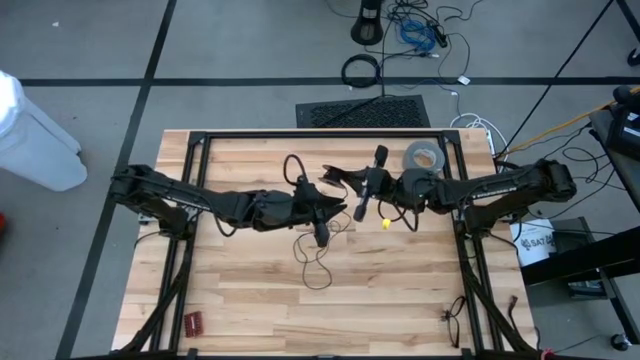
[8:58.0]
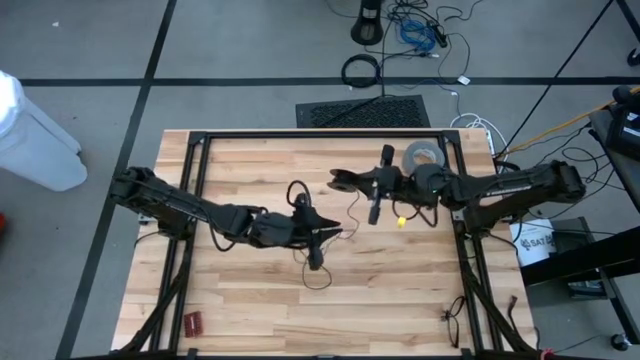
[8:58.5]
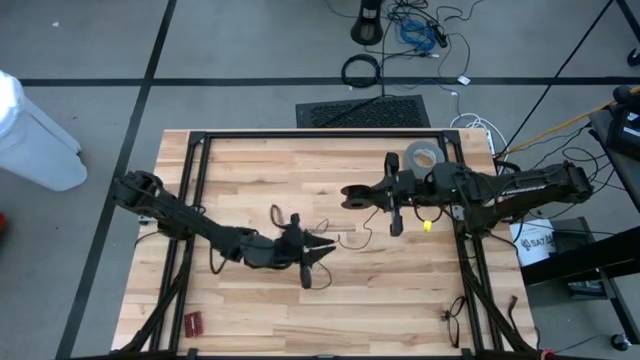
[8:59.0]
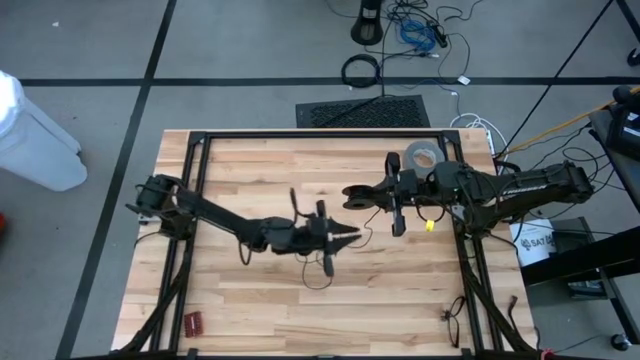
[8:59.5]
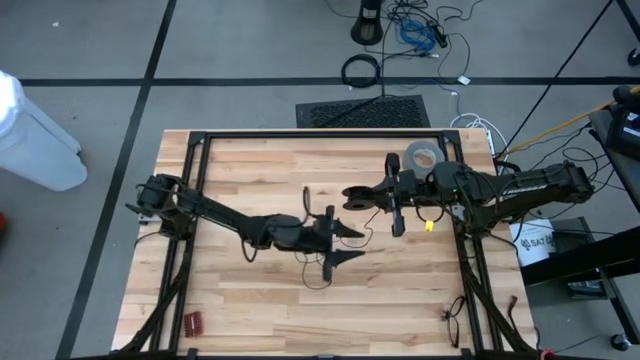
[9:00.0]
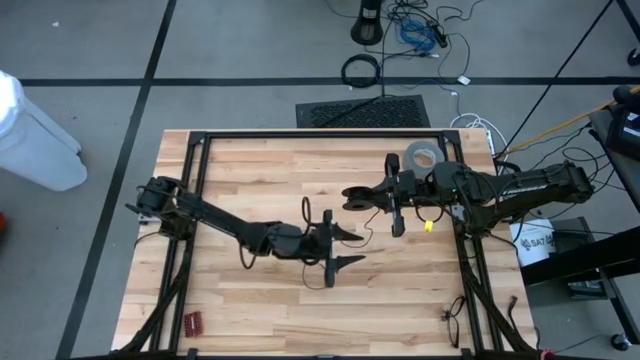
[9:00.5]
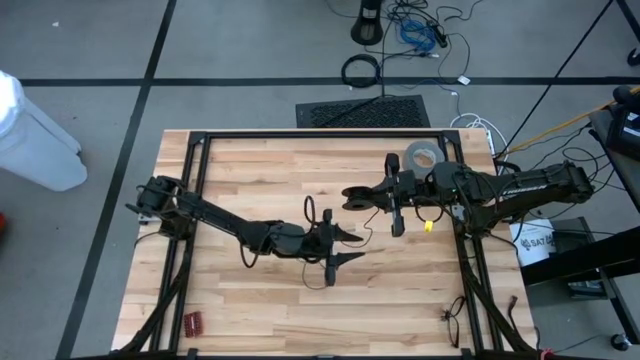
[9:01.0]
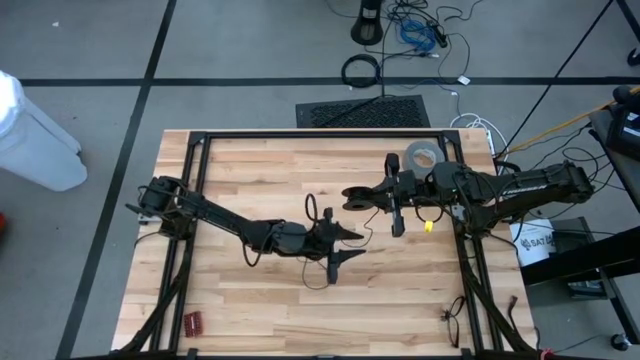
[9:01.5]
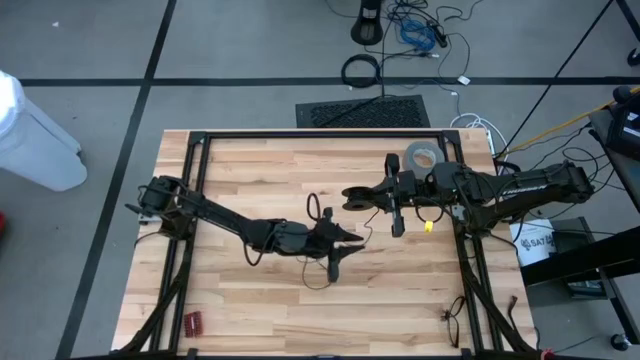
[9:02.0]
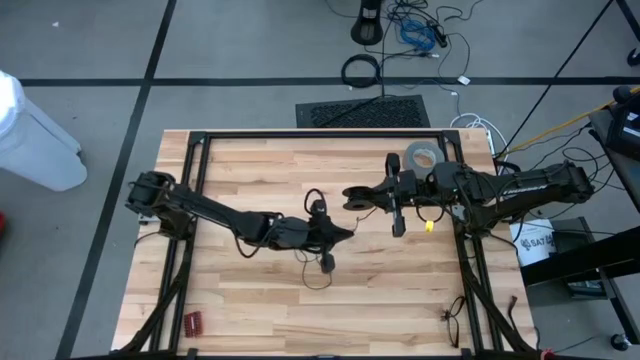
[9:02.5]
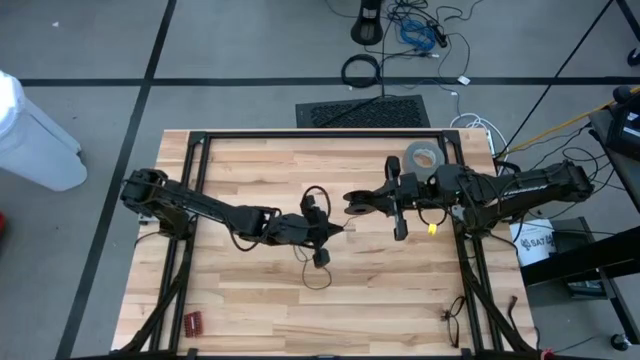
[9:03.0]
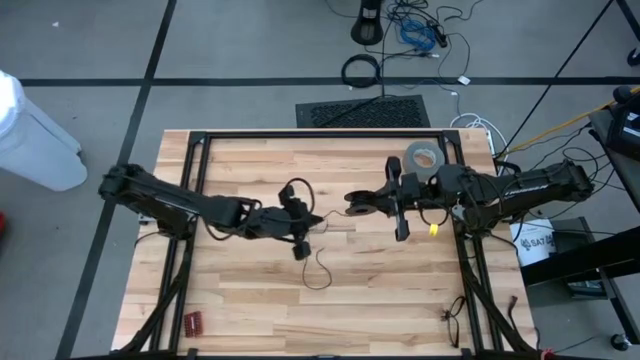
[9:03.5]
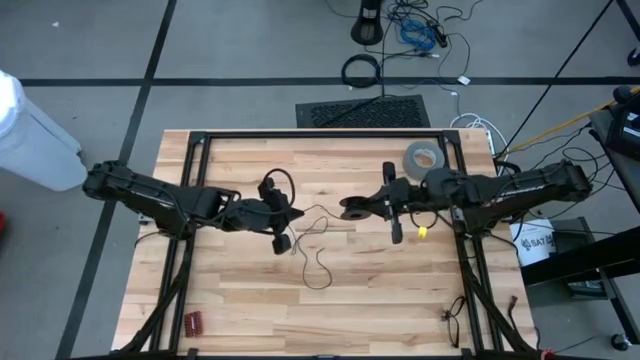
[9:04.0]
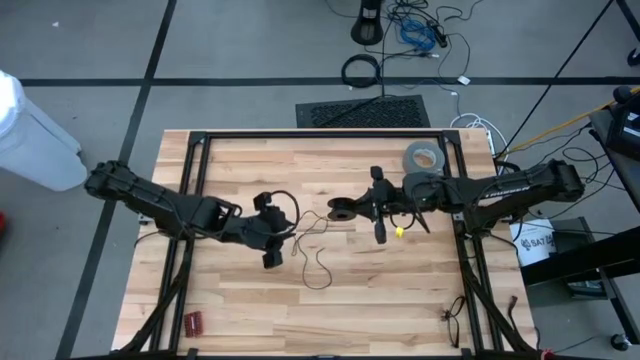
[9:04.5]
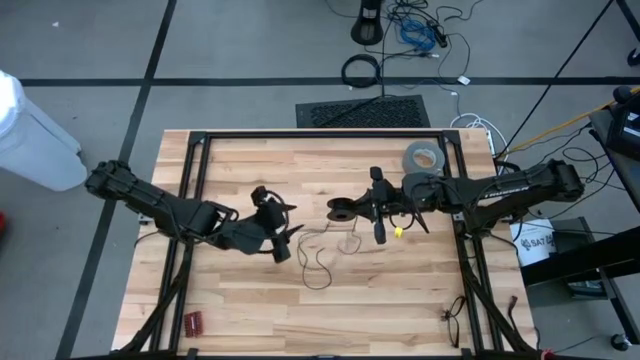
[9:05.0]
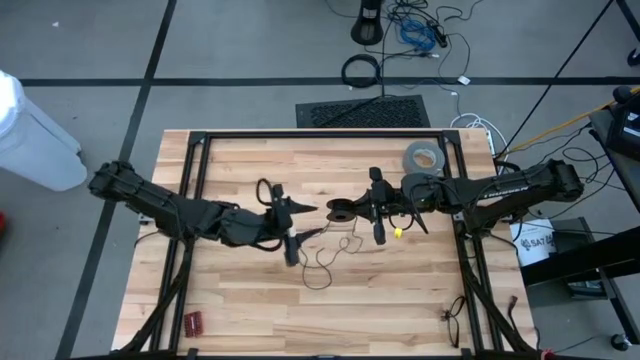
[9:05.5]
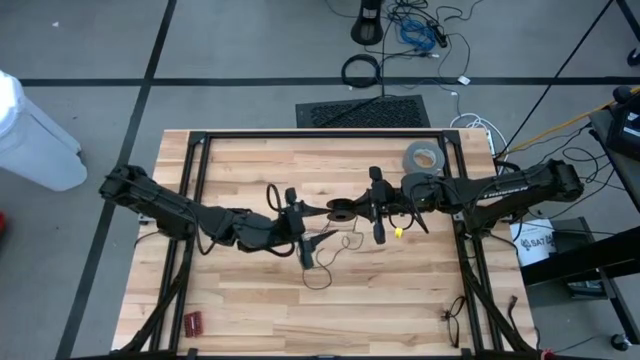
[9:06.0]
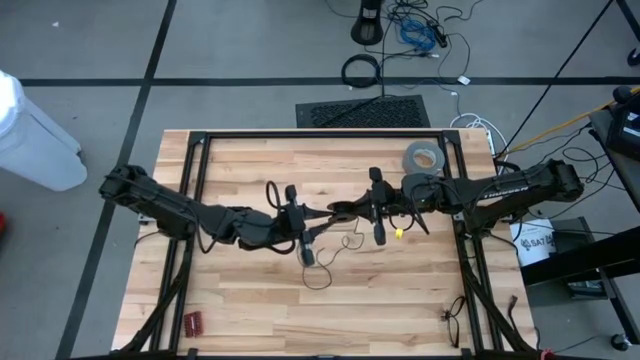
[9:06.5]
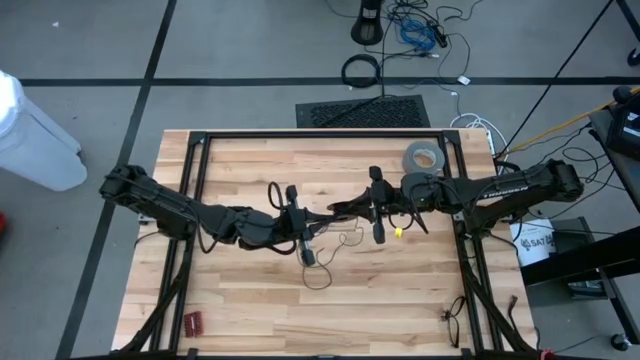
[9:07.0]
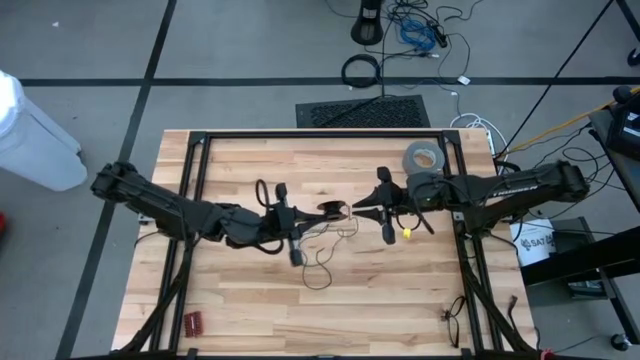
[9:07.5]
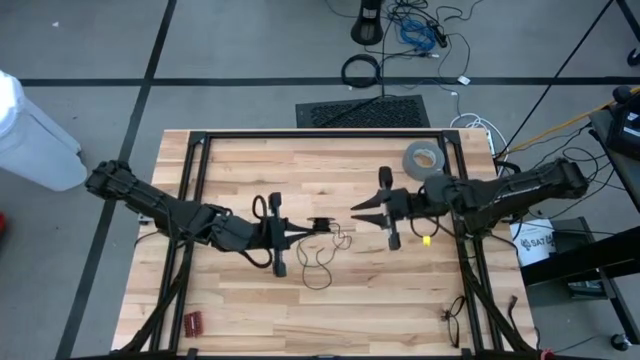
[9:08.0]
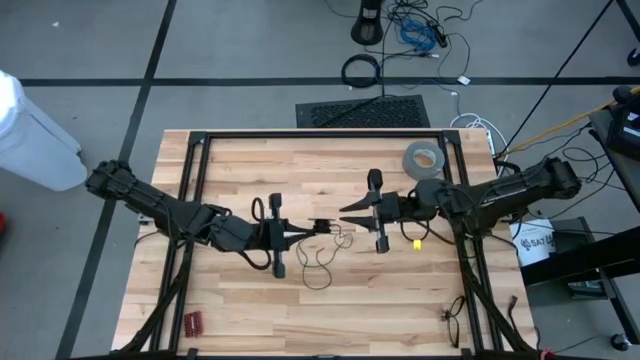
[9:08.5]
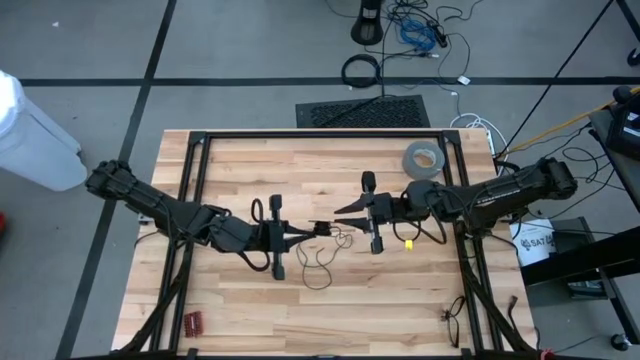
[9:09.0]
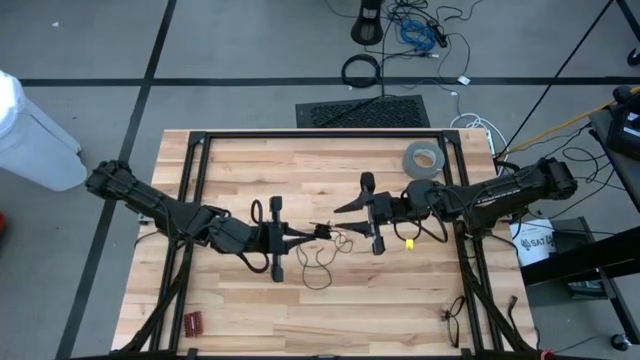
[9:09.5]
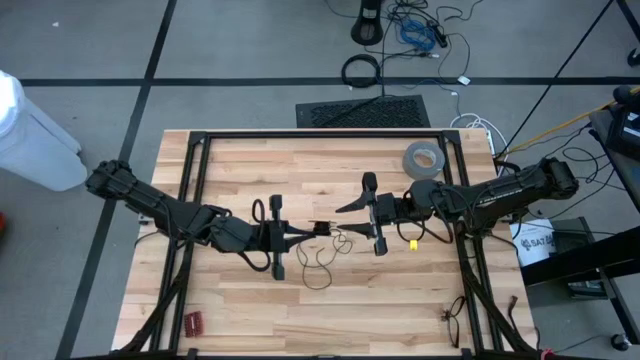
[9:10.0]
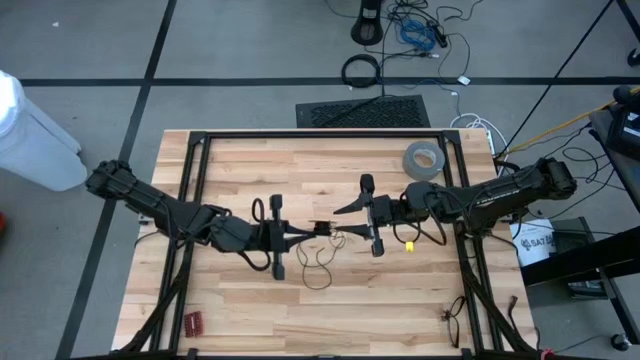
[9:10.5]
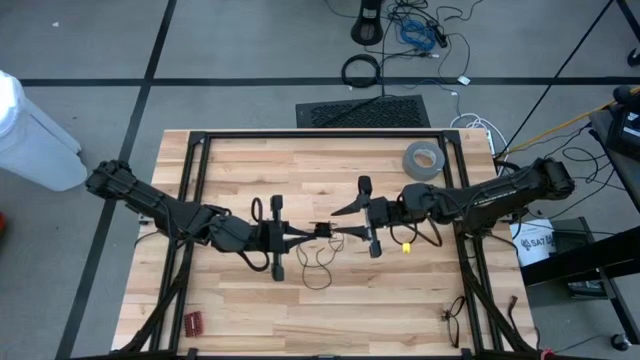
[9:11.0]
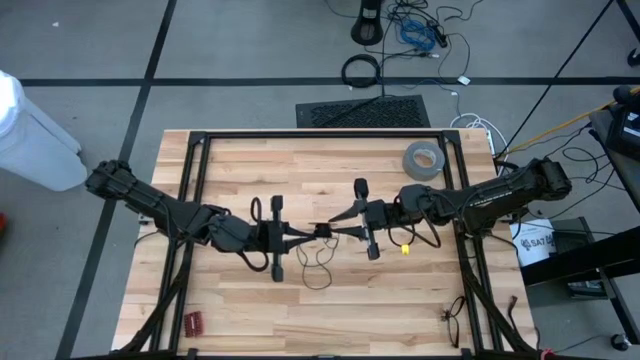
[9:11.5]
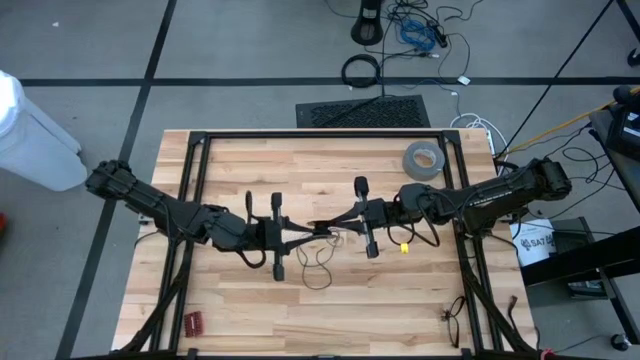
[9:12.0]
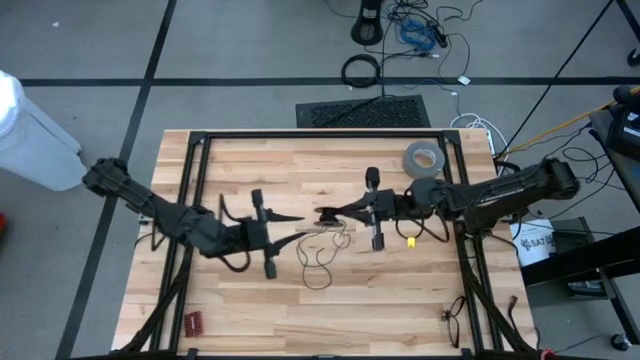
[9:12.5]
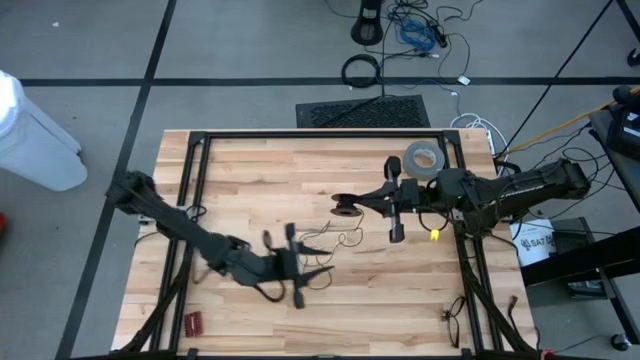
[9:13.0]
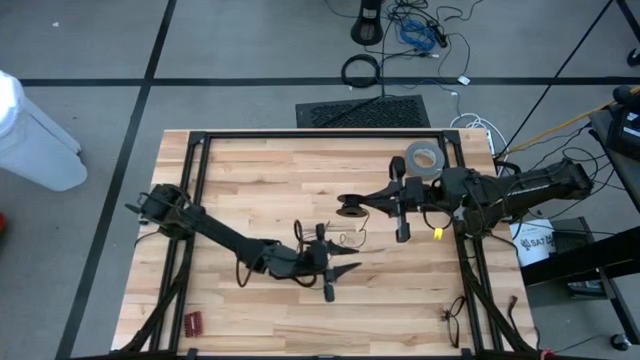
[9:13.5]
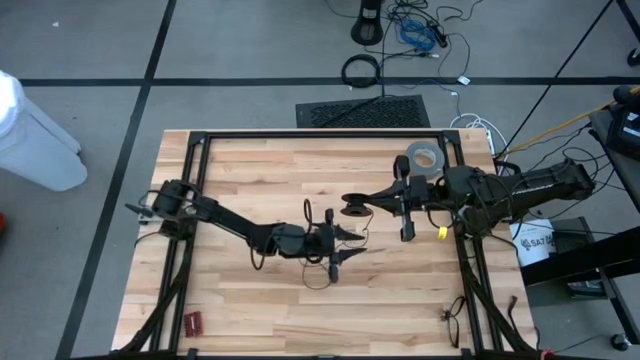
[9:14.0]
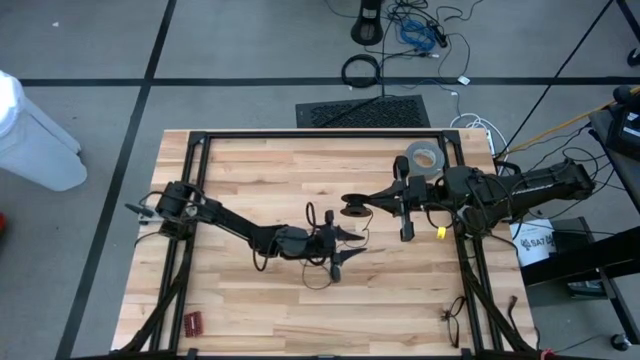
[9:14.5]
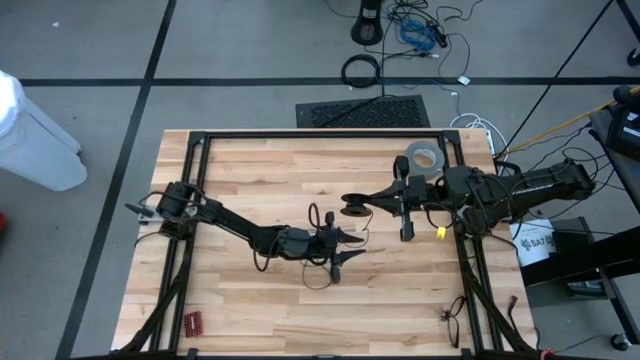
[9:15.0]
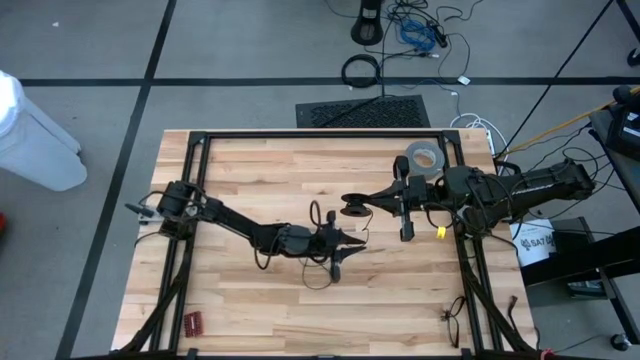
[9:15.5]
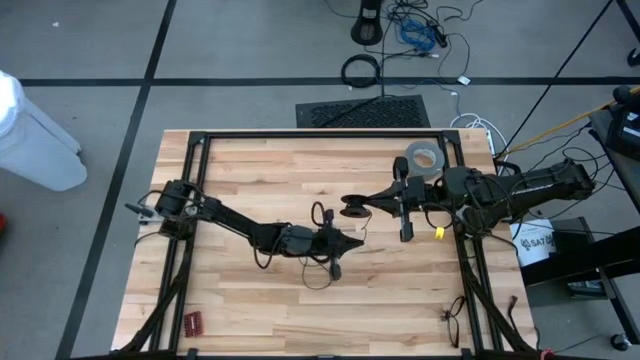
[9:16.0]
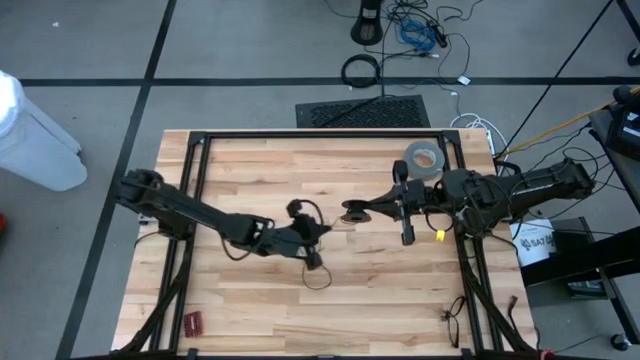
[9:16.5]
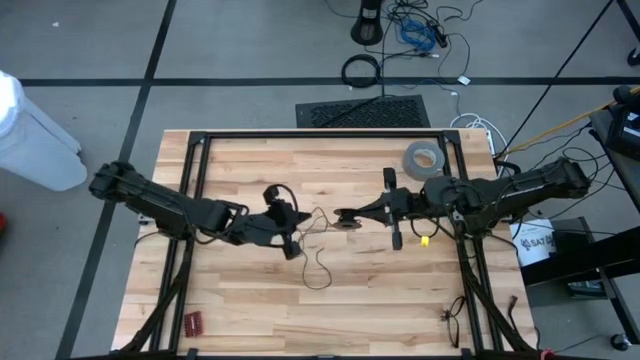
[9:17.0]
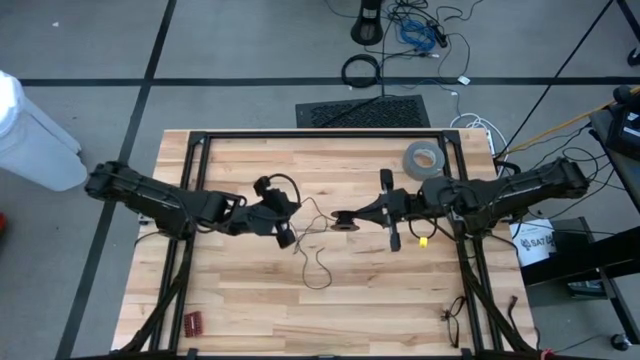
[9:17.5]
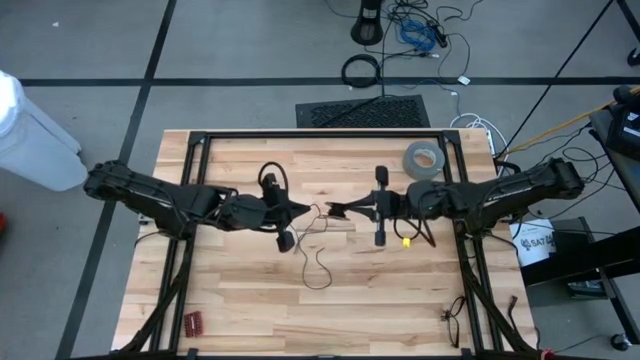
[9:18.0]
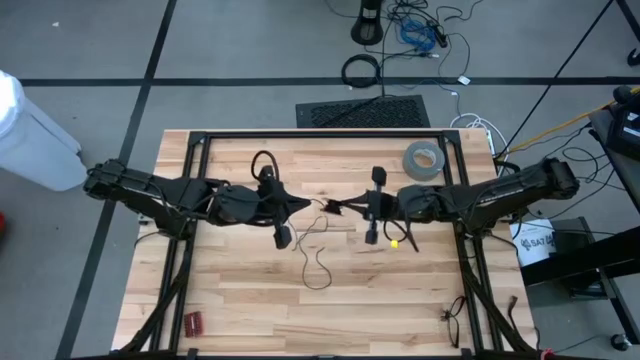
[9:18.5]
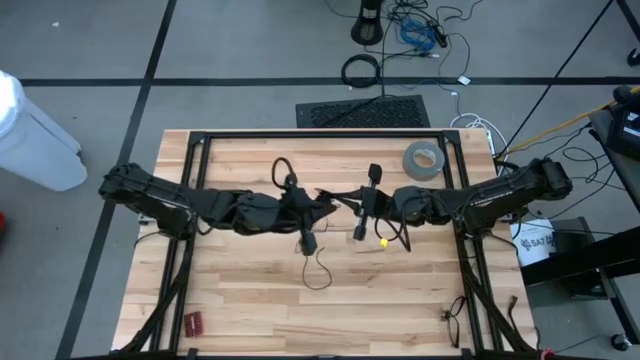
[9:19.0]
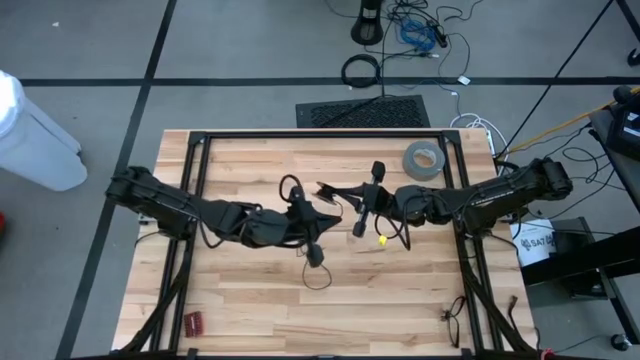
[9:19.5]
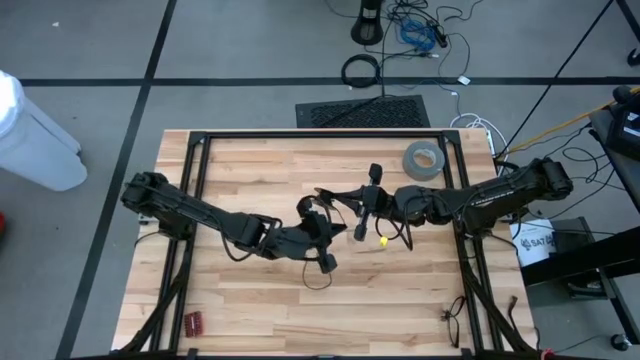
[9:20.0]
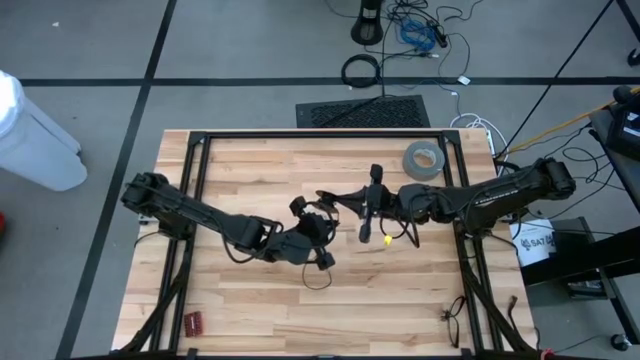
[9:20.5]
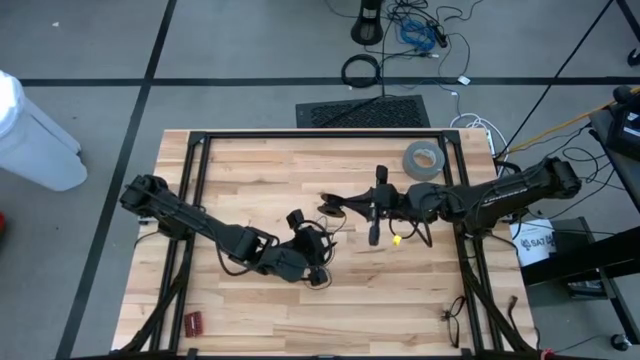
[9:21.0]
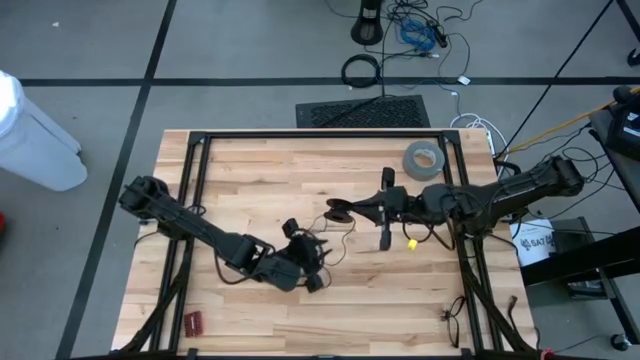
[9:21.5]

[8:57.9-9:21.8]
Task: Coil cords
Coil the black wire onto the spool
